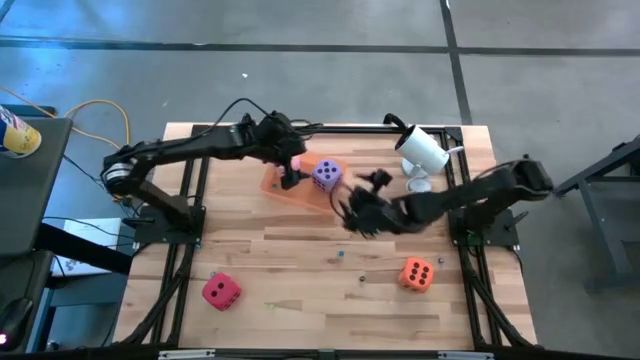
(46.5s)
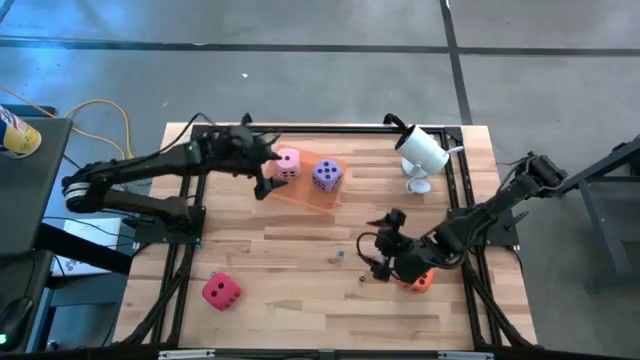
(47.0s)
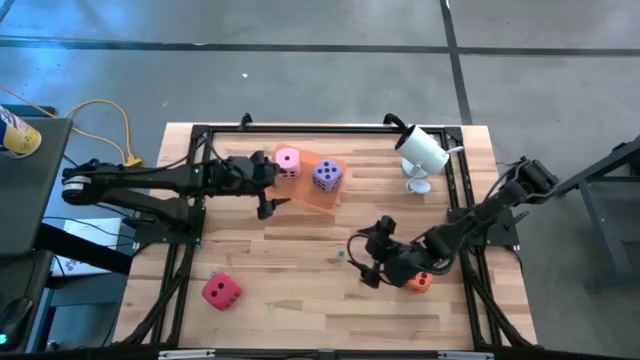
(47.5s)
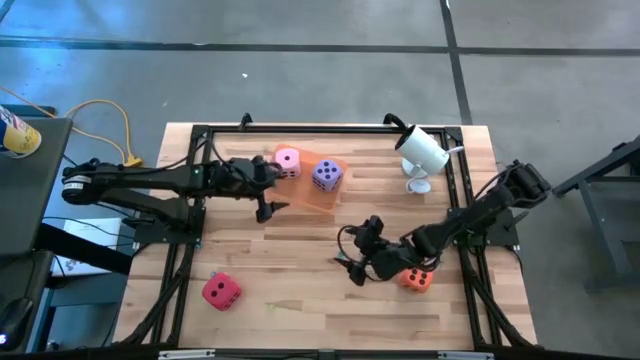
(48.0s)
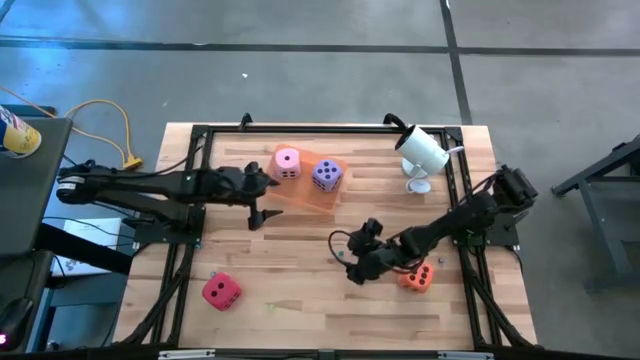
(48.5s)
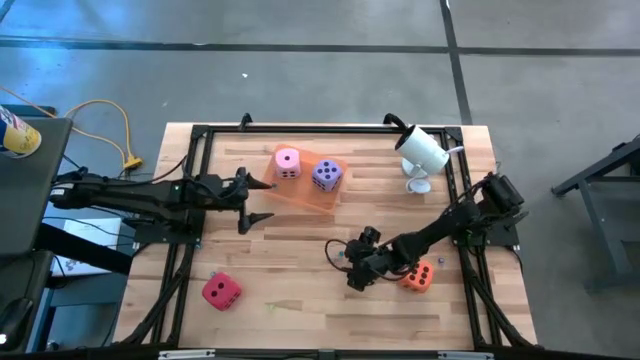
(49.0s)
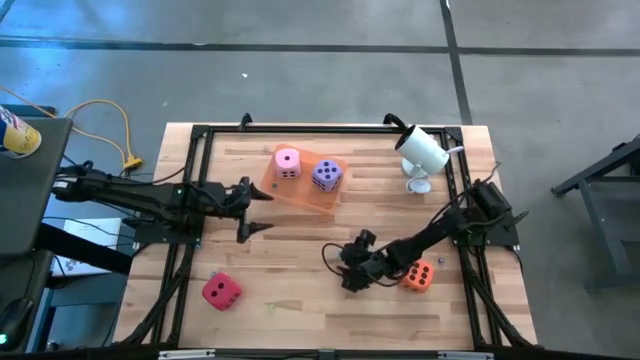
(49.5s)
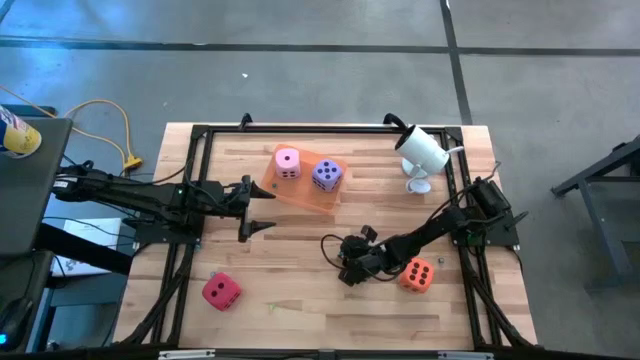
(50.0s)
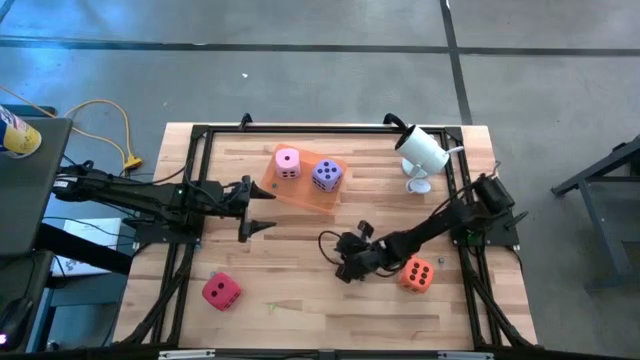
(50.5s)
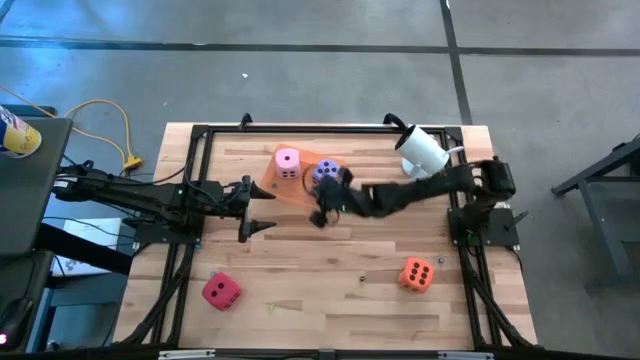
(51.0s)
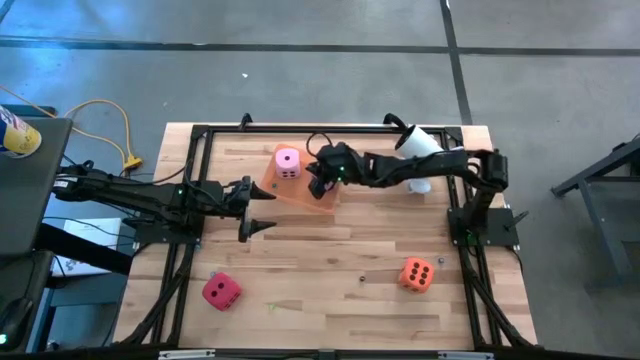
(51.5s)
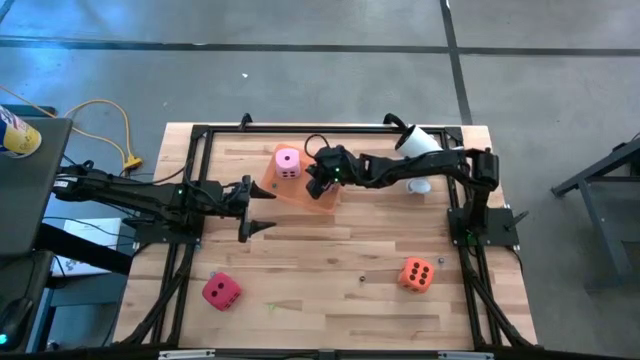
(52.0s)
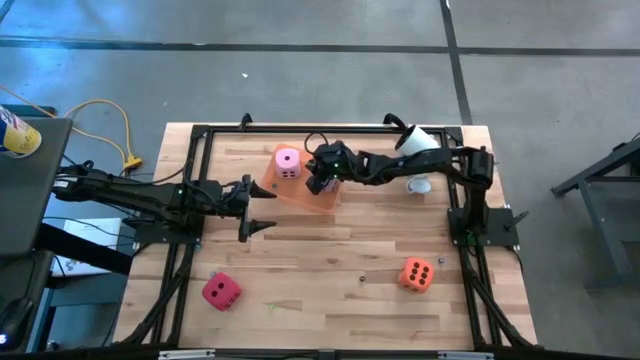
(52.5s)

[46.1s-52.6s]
Task: Pick & Place Dice
Put the small blue die into the orange bin

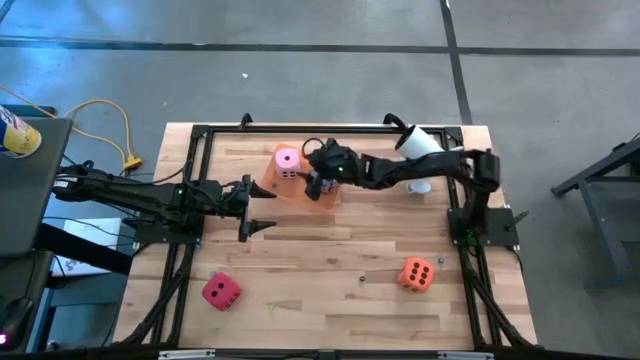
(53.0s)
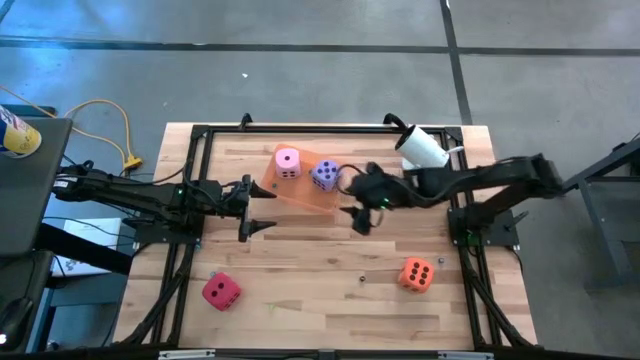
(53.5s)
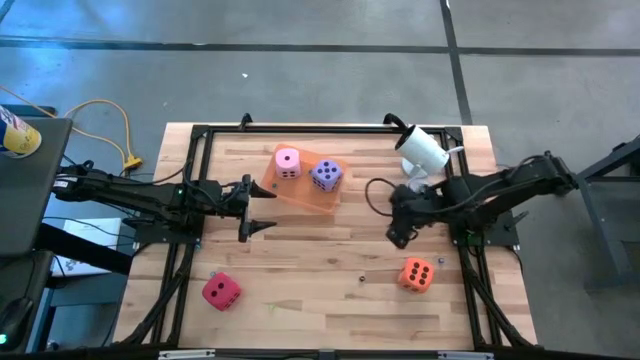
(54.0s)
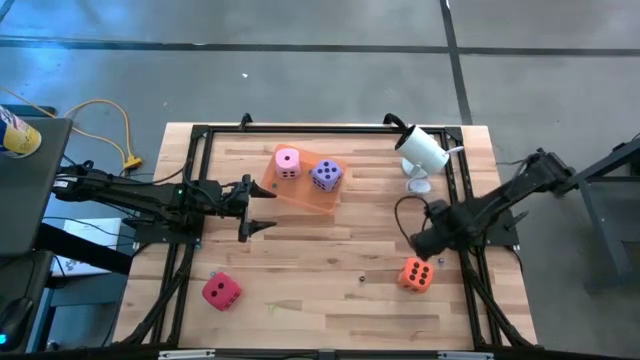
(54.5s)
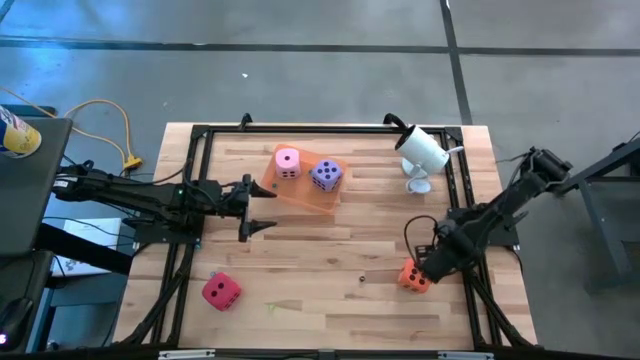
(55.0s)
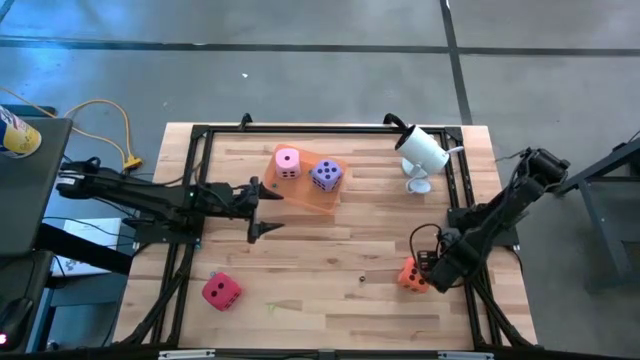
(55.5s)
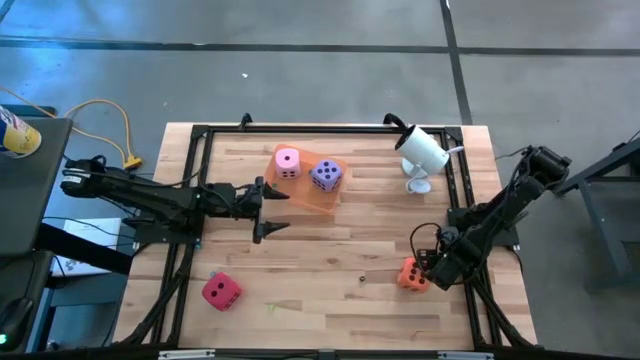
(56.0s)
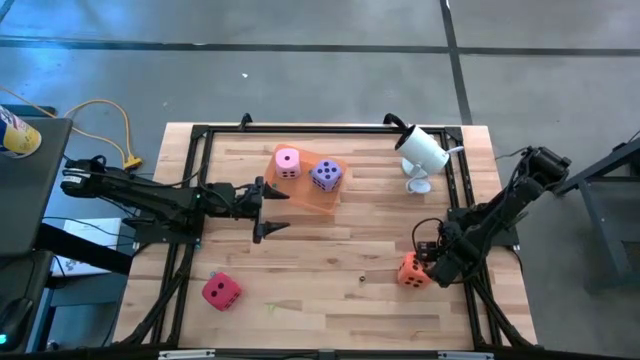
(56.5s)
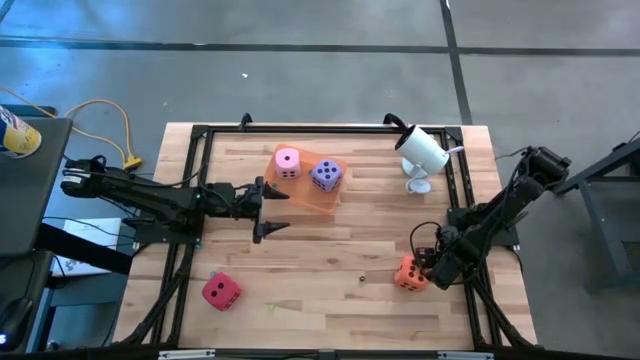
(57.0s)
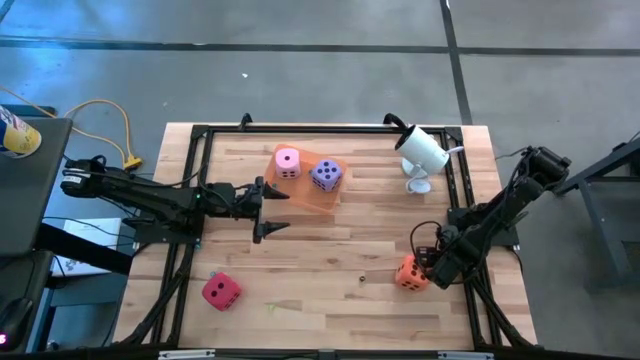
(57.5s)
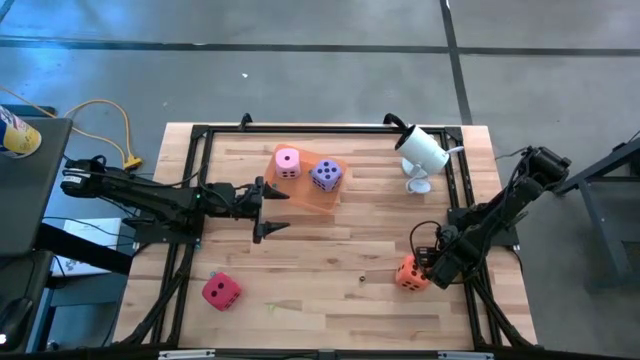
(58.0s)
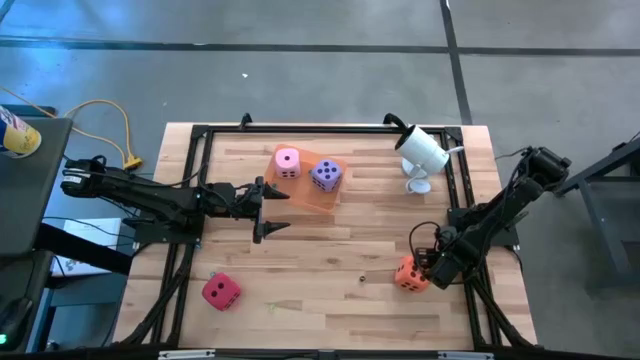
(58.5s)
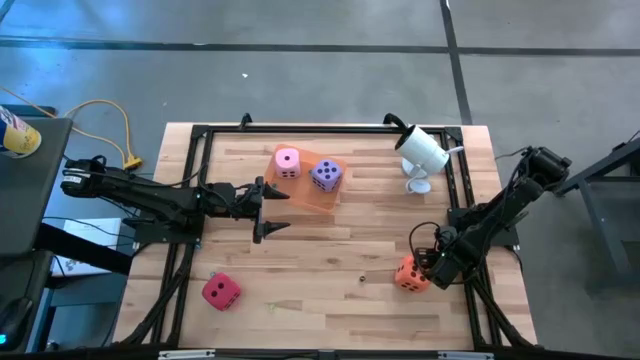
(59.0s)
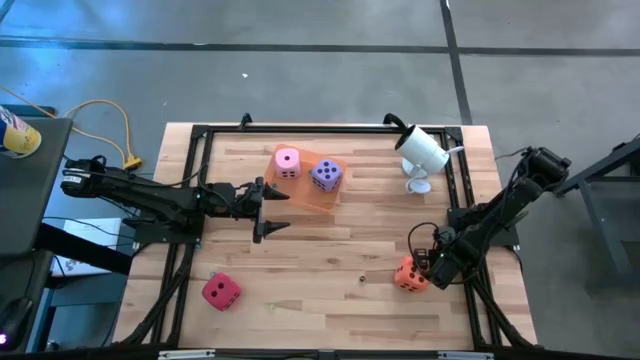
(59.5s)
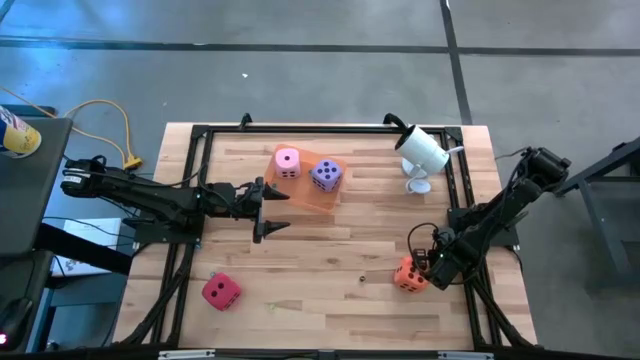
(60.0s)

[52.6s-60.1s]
Put the small dark blue die into the orange bin

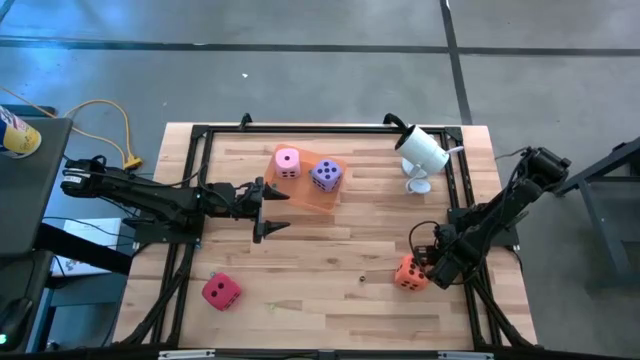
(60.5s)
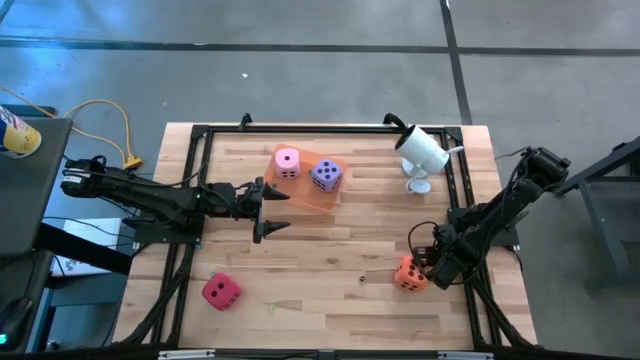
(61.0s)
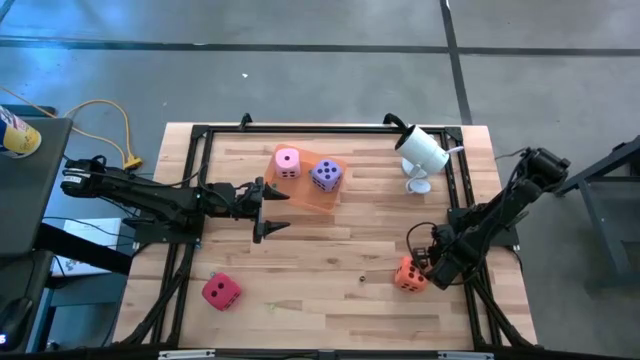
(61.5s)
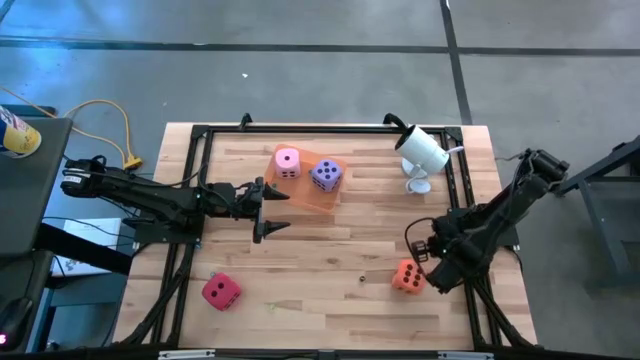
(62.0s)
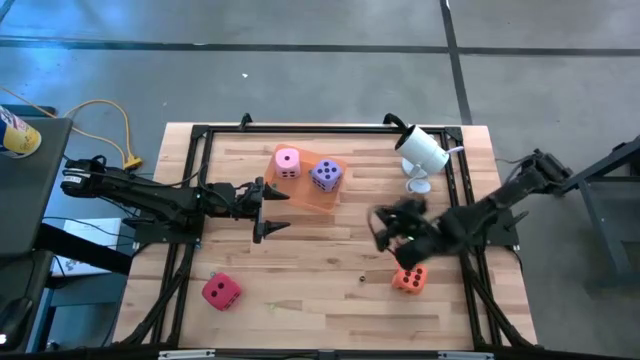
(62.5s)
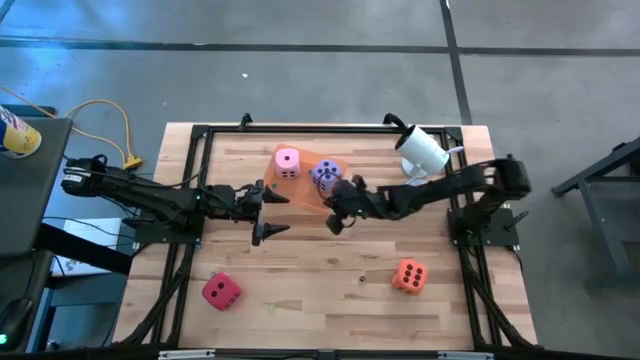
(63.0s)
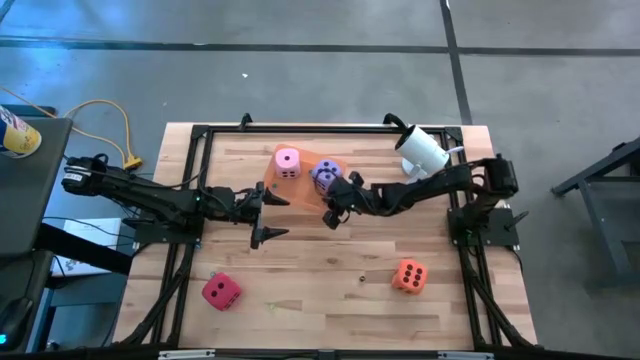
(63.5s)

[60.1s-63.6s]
Put the small dark blue die into the orange bin

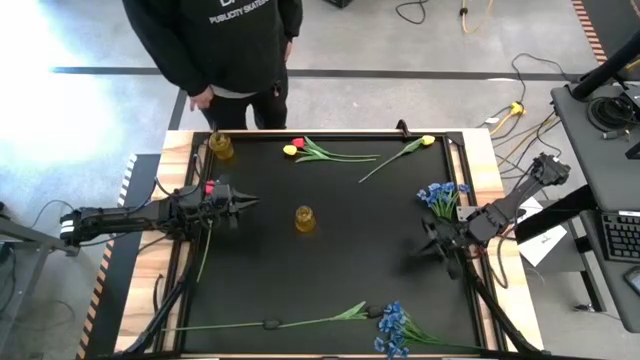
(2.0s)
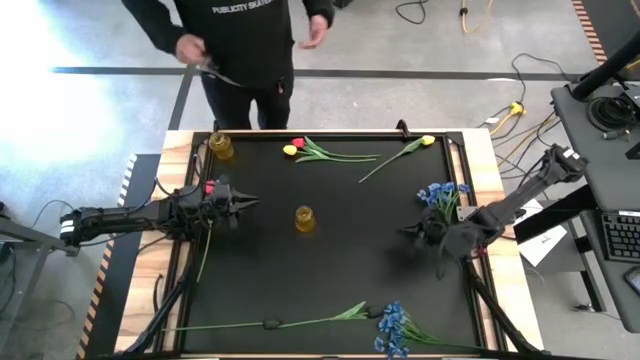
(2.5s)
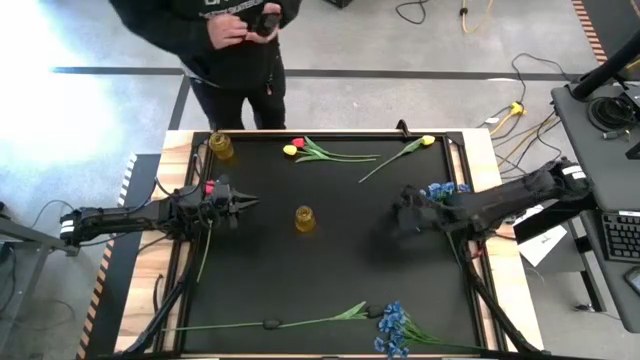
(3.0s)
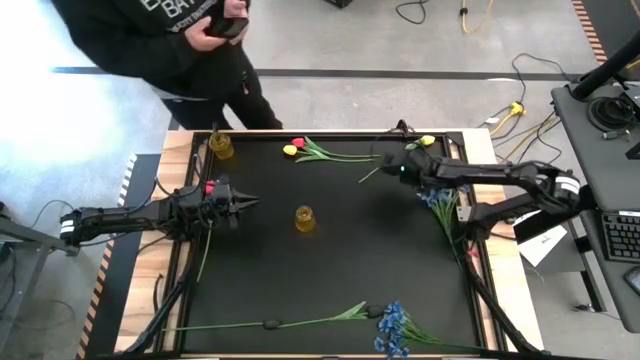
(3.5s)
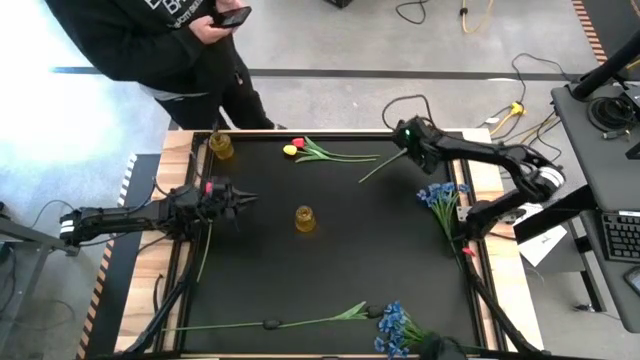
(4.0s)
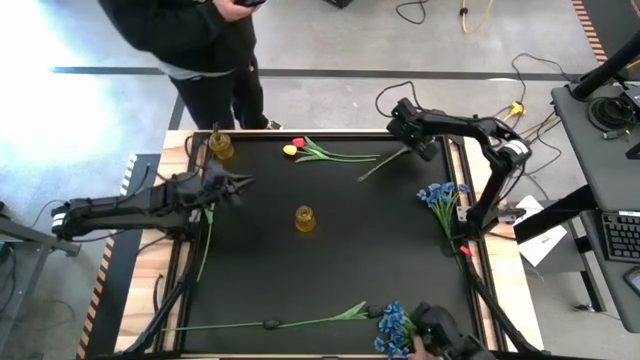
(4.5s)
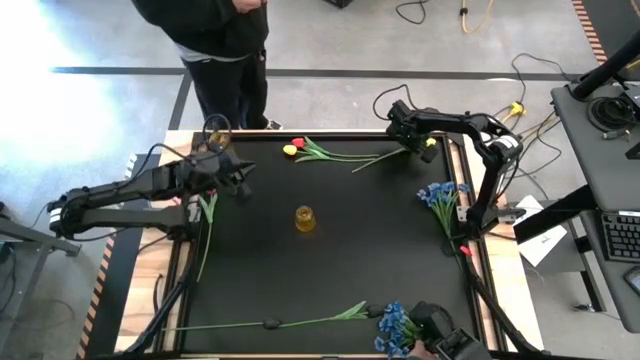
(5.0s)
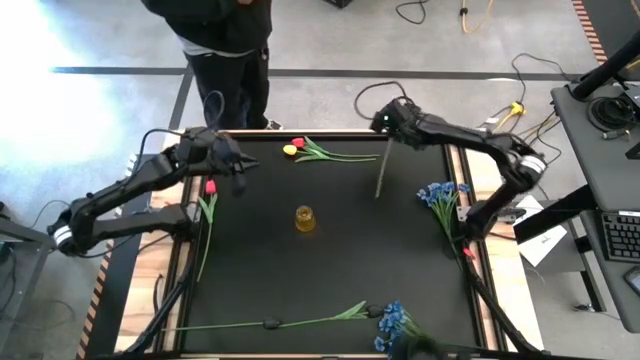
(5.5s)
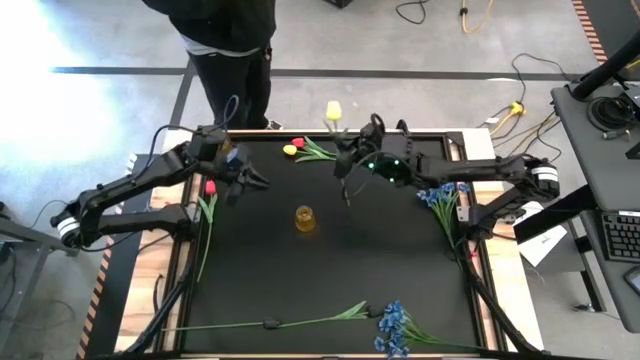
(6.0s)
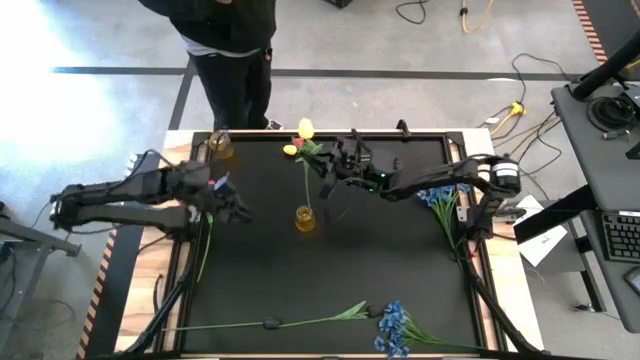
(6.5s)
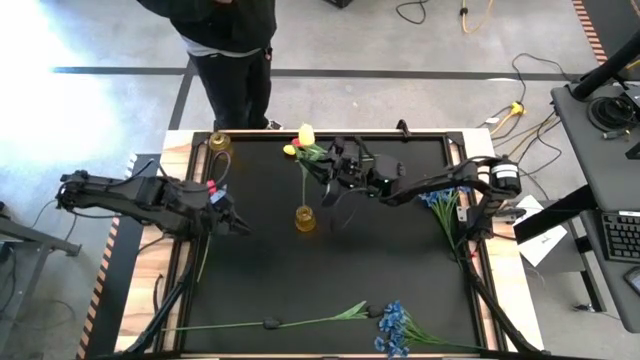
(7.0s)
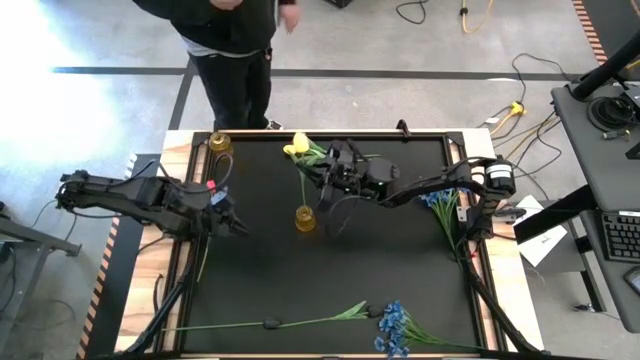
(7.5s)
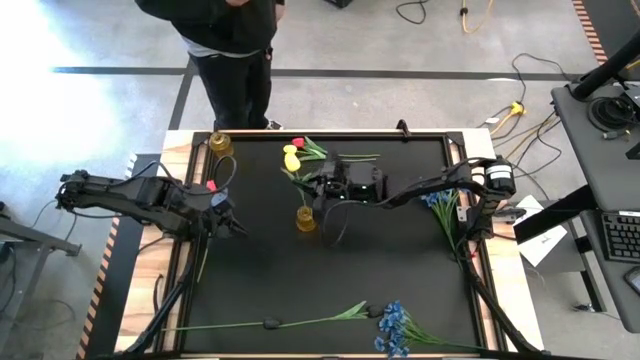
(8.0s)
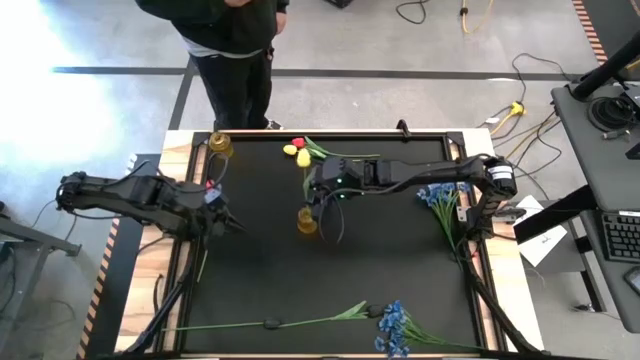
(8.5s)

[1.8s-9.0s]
Task: Sort flowers into vase by color
Put the right yellow tulip into the bottom vase
